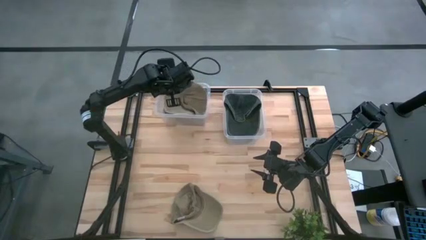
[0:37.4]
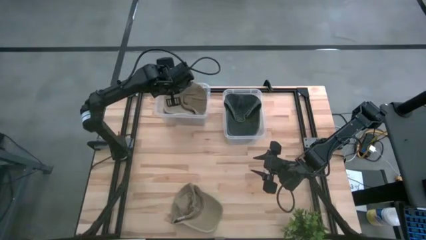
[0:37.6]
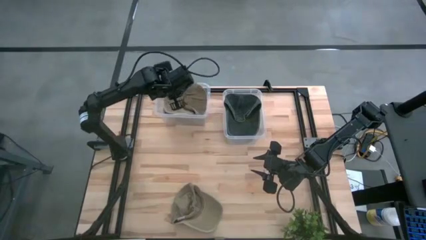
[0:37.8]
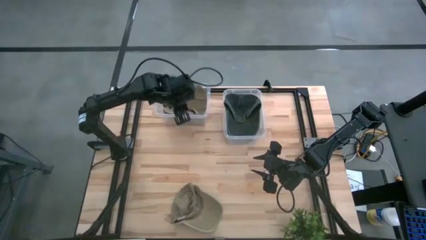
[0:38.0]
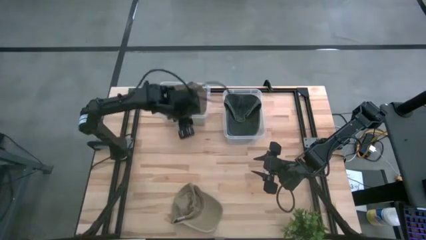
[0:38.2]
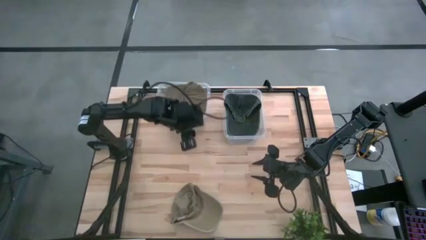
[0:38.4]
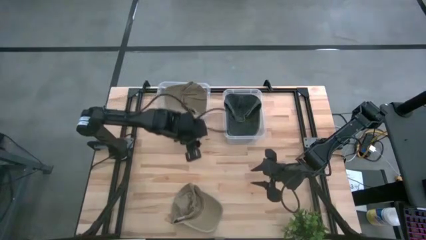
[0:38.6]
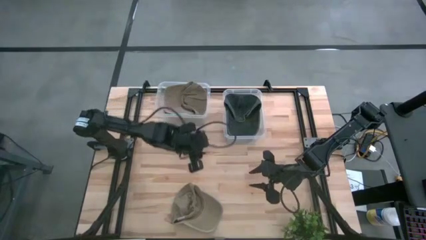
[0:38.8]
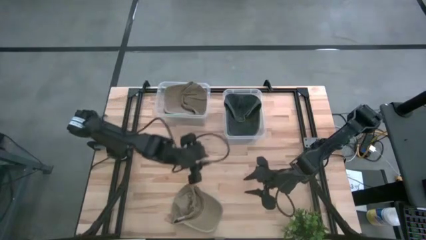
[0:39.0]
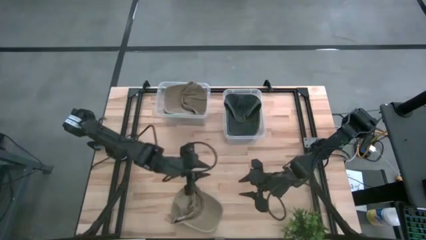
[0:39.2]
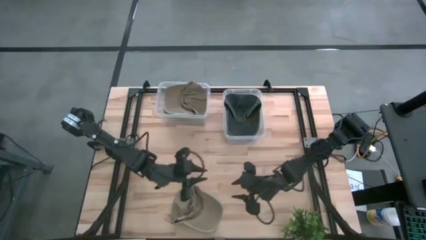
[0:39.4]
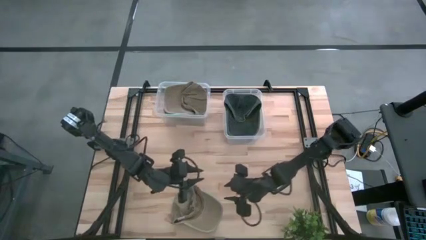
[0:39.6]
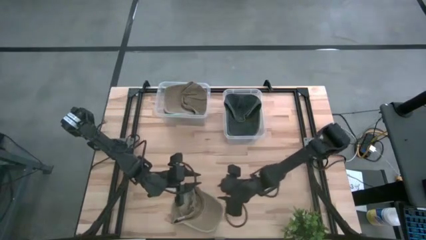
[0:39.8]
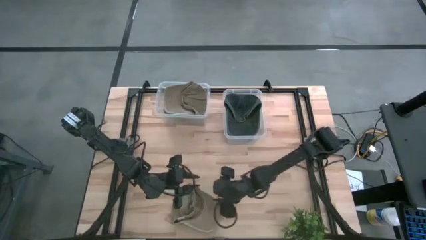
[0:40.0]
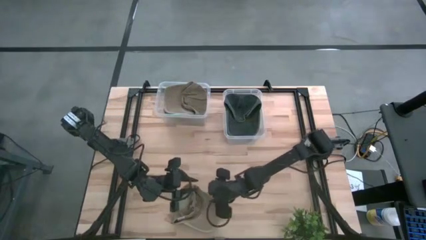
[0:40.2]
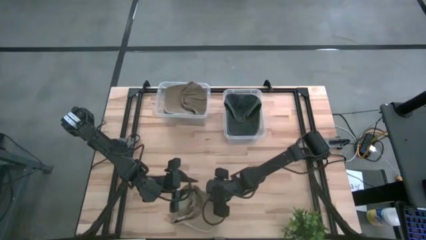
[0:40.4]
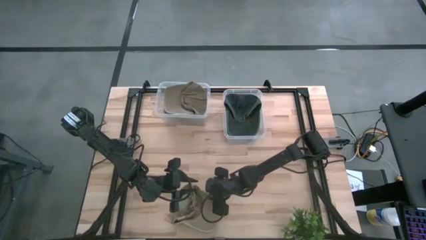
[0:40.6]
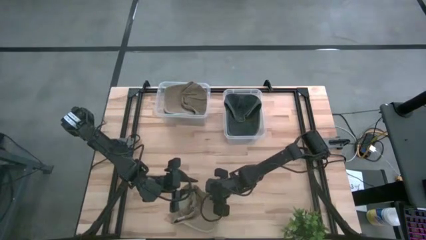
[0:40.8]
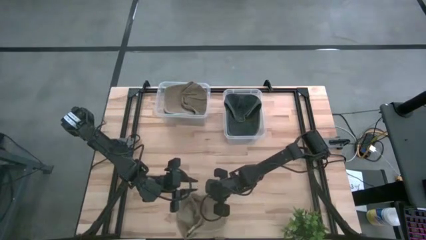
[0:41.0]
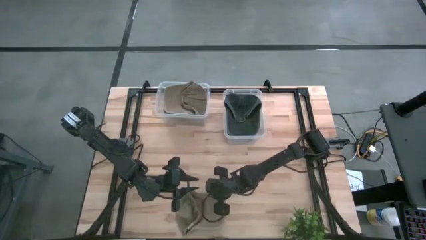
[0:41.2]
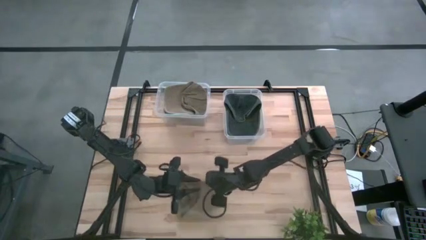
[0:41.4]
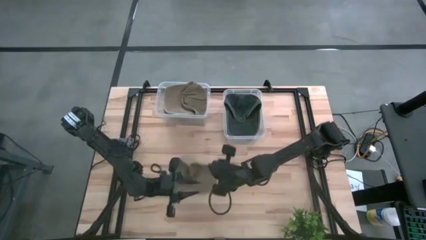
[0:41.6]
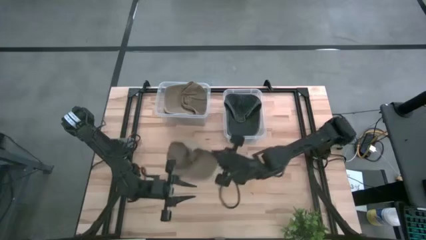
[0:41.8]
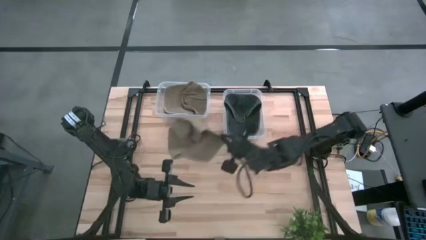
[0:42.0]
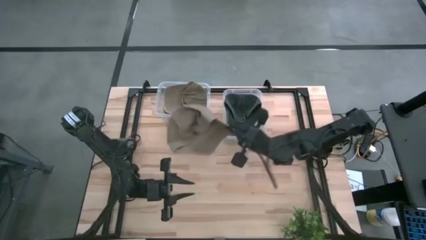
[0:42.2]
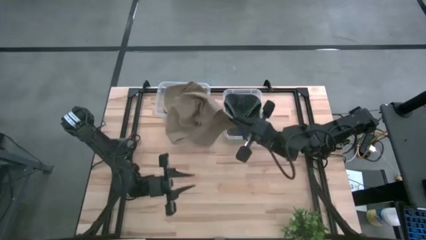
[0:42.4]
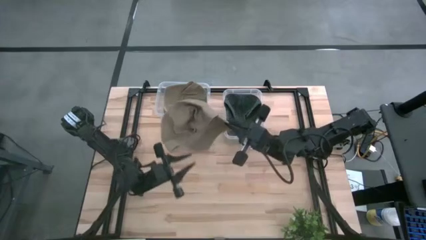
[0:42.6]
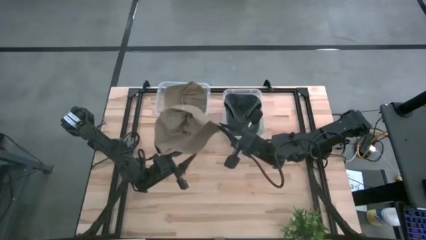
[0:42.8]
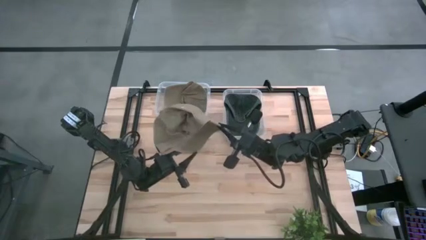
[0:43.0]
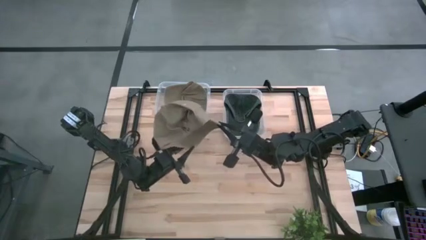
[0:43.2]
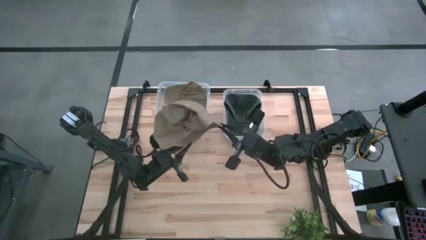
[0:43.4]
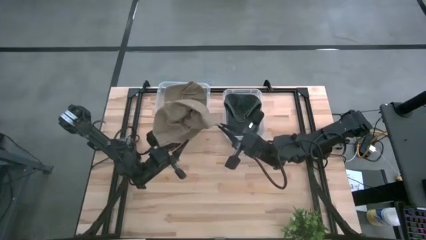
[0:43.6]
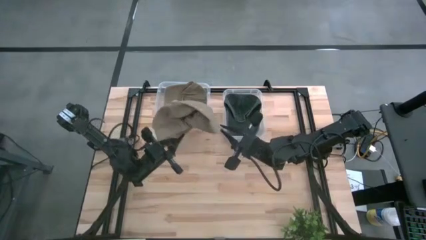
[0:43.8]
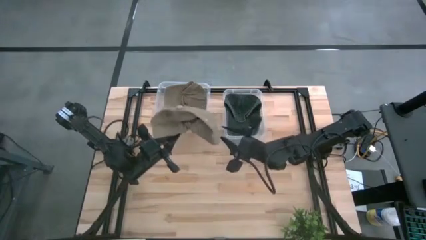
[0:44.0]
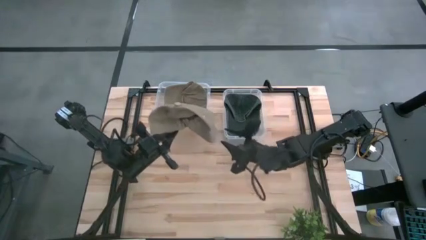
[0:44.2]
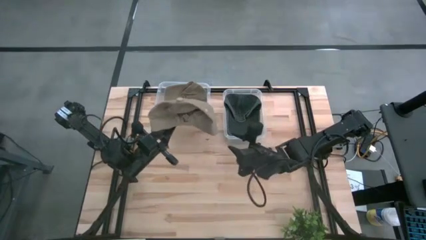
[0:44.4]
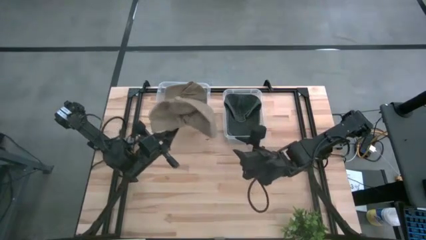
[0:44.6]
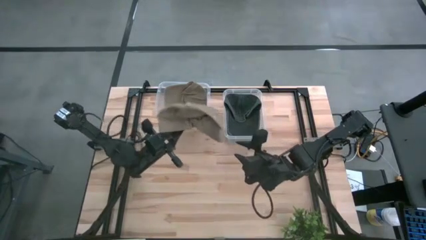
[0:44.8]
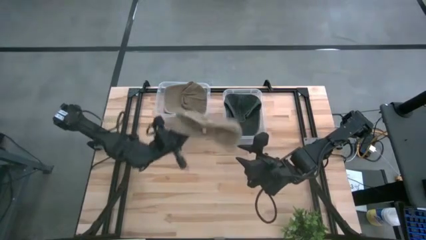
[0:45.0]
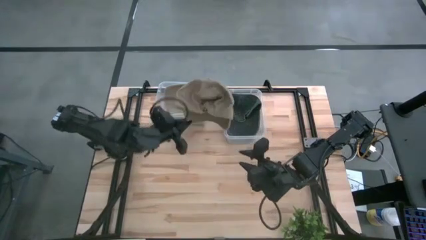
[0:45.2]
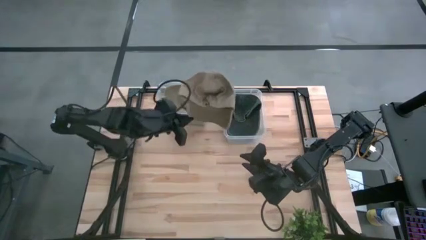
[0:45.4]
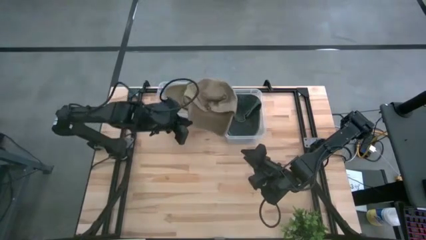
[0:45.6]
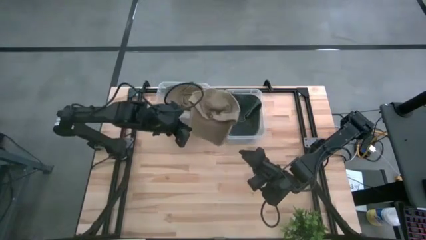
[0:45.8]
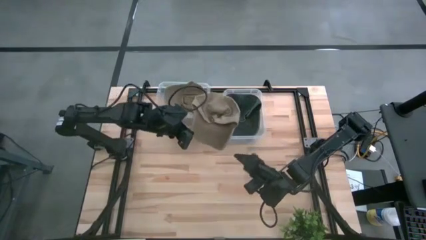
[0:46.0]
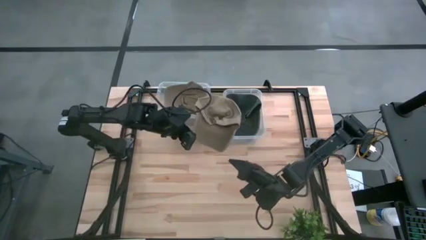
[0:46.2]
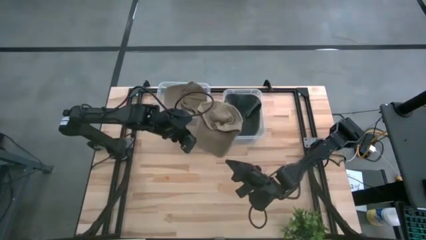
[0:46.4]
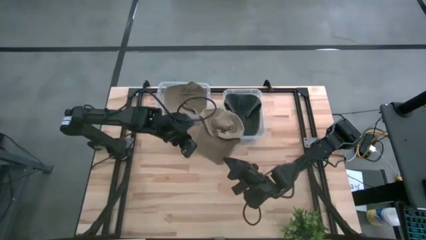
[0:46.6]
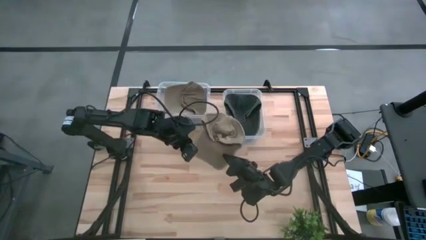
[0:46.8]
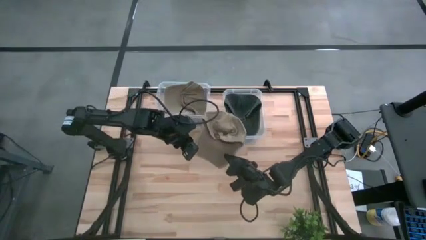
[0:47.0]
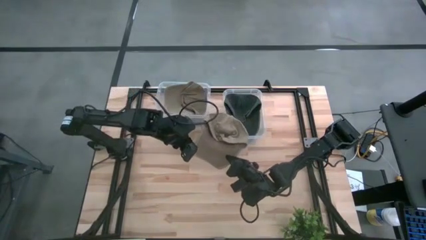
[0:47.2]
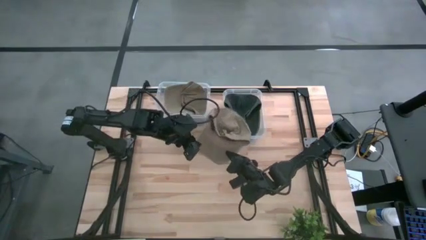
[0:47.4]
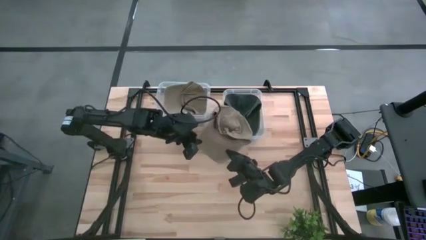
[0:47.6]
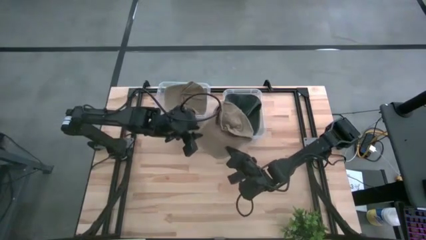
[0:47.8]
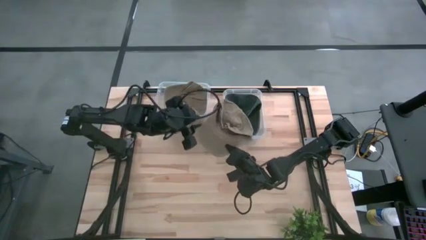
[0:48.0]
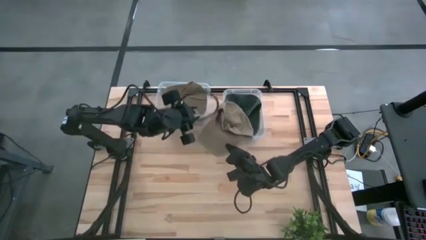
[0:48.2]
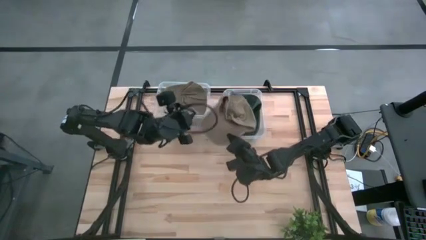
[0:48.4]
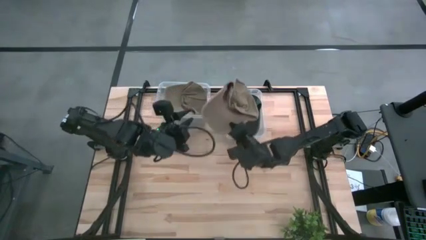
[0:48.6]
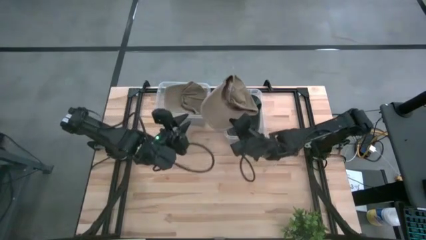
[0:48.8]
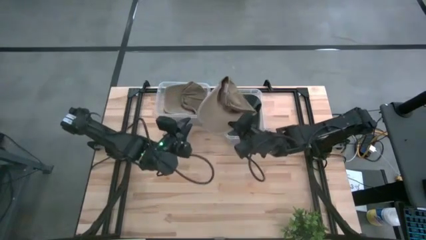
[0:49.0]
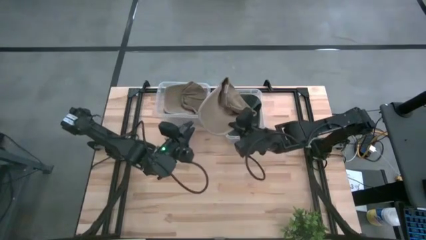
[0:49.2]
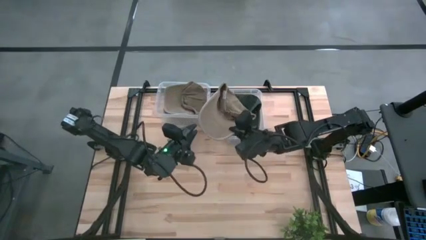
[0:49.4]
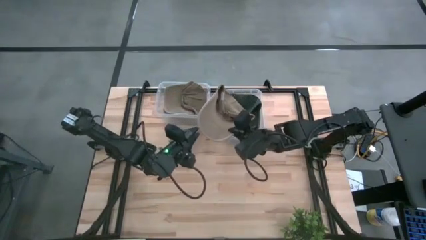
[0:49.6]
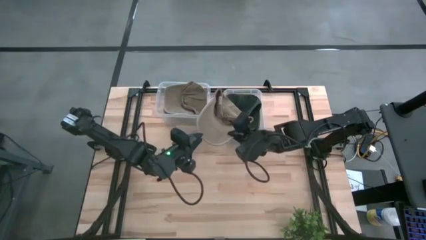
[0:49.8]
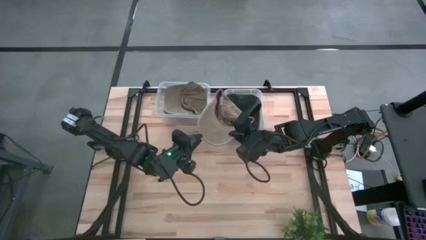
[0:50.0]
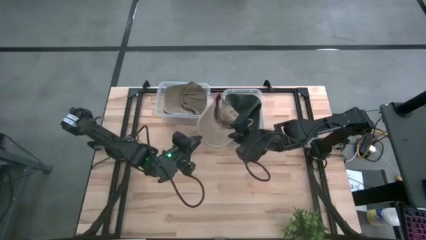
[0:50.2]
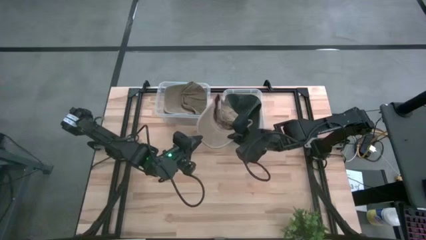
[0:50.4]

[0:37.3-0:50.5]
Task: Pick & Place hat
Put the light brown cap into the left transparent bin
